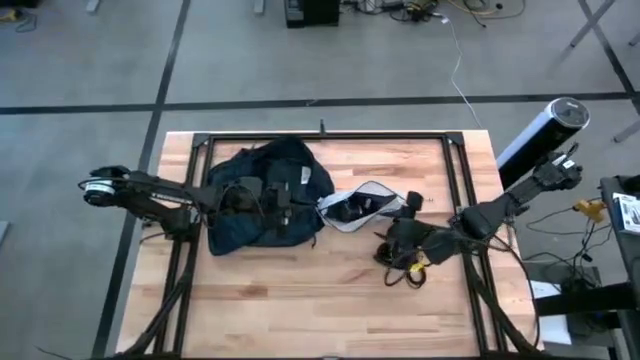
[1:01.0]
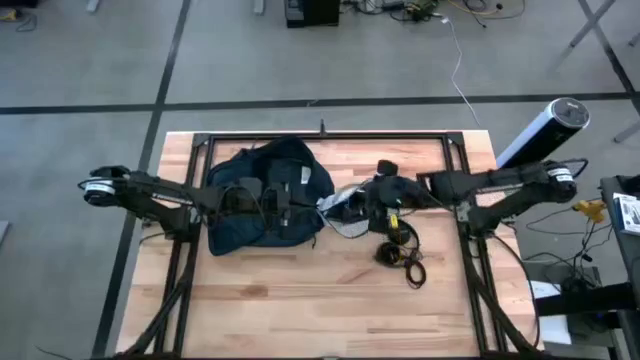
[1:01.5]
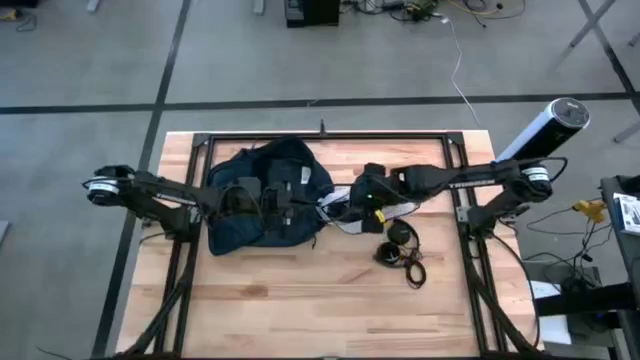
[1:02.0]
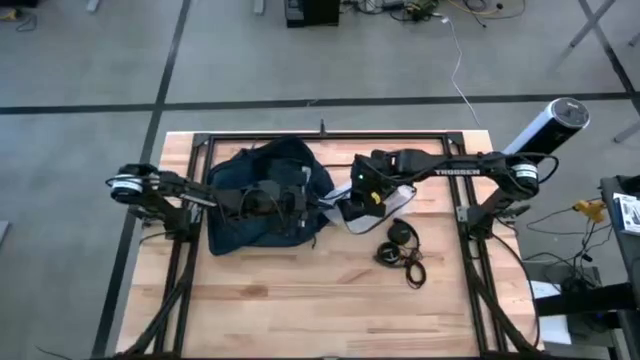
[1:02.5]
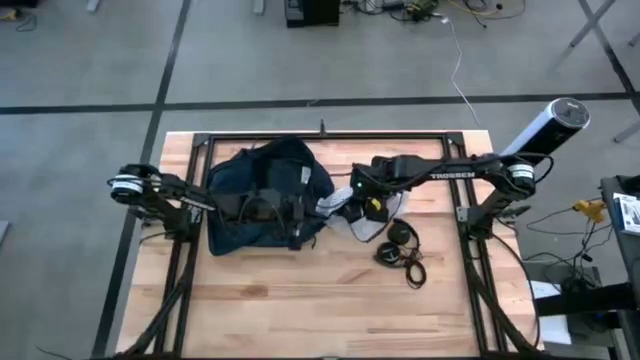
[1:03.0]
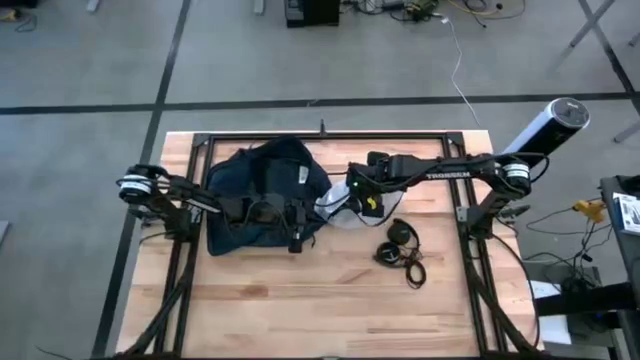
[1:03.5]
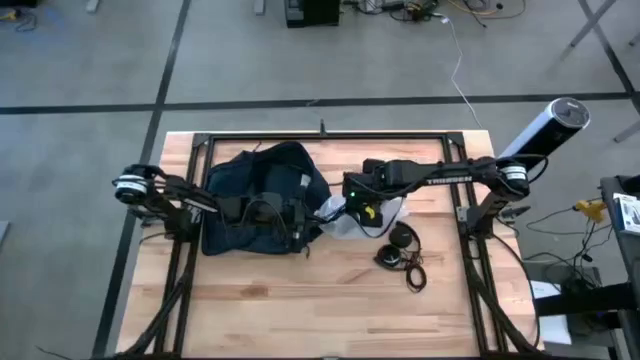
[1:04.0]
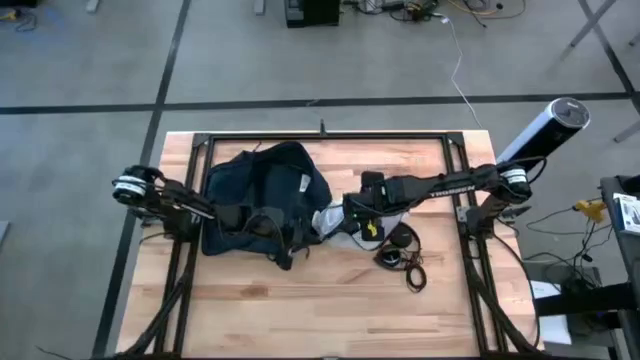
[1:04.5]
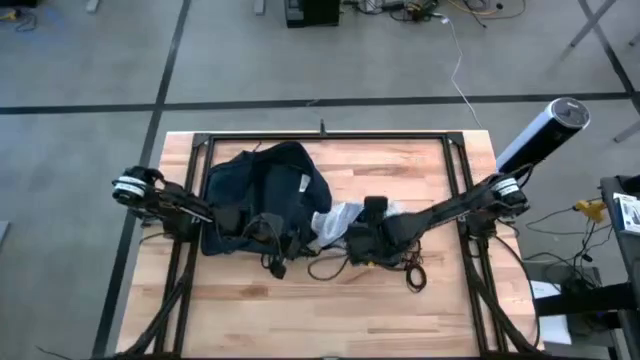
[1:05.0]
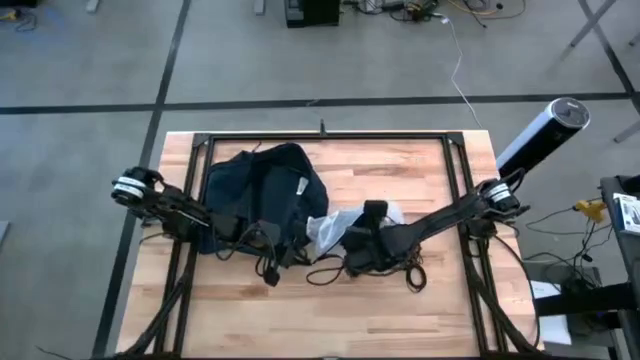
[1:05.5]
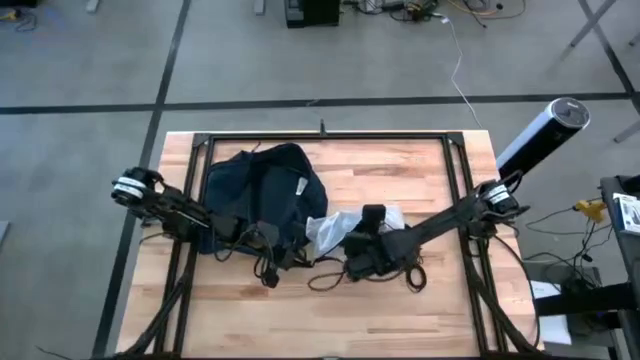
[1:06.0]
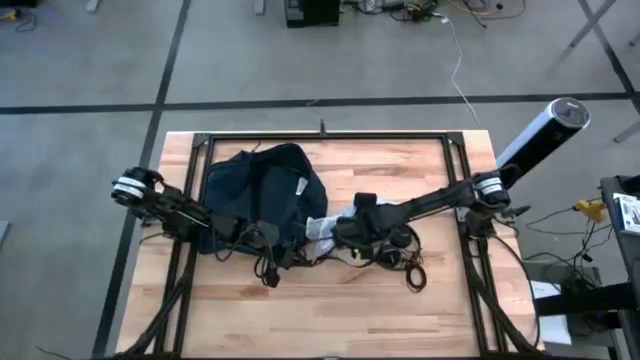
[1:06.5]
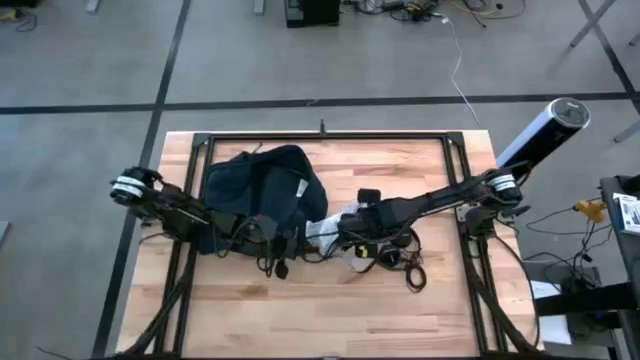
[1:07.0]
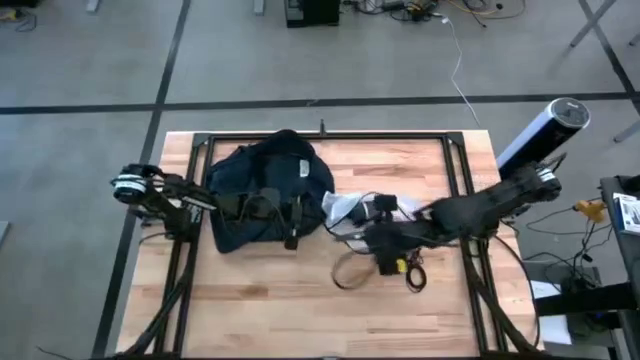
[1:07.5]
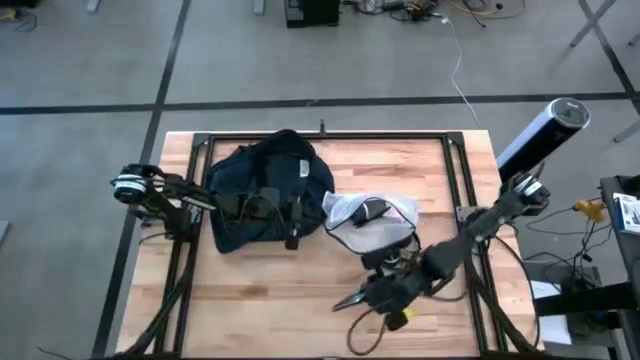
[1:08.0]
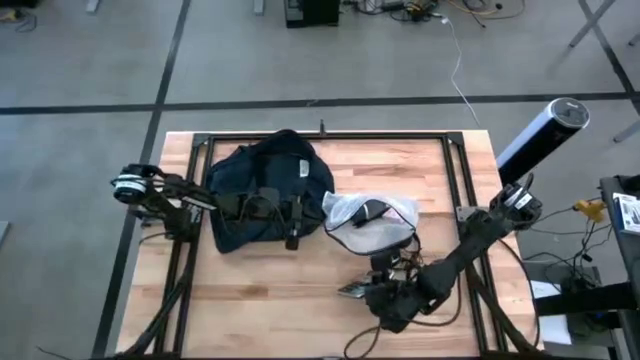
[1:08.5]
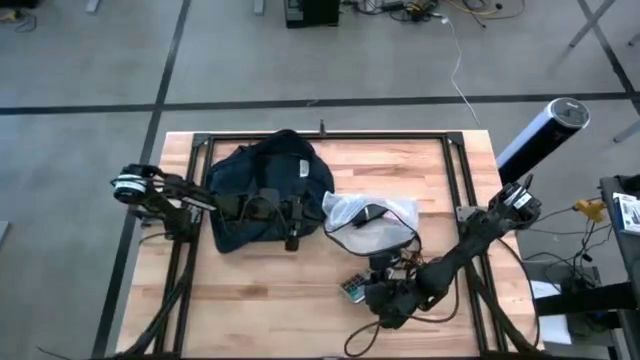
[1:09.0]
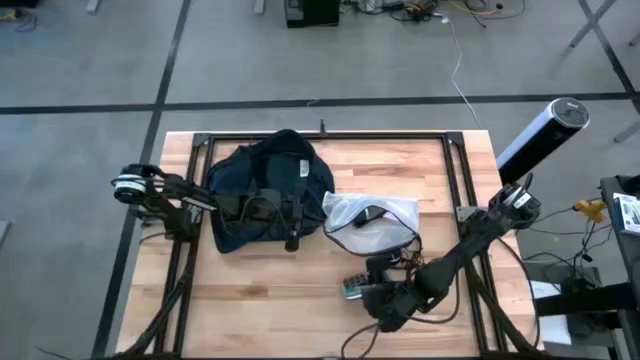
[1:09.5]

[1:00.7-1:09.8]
Task: Unpack backpack
Remove the white calculator from the white zipper pouch

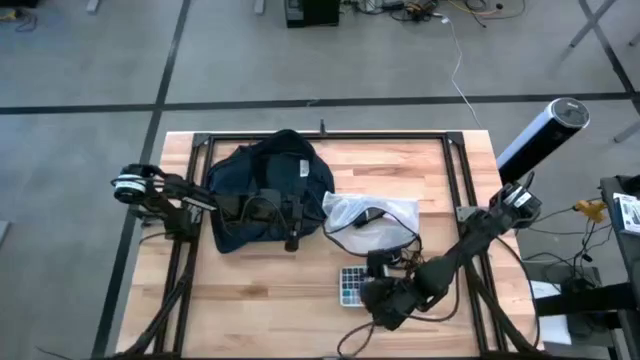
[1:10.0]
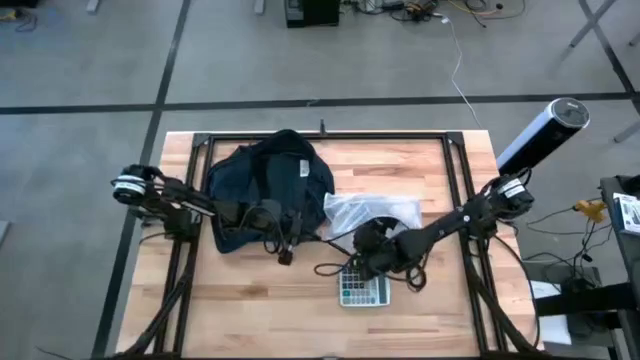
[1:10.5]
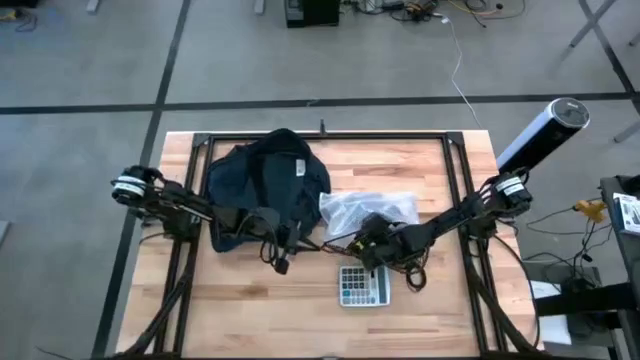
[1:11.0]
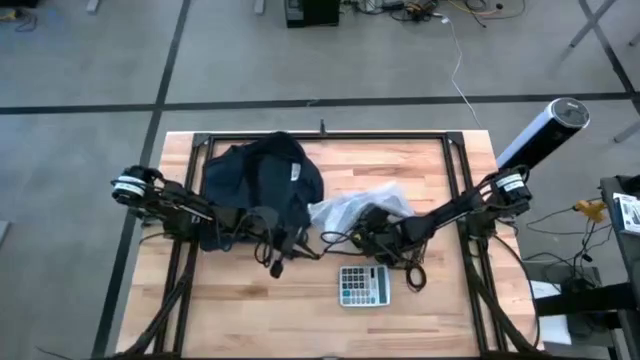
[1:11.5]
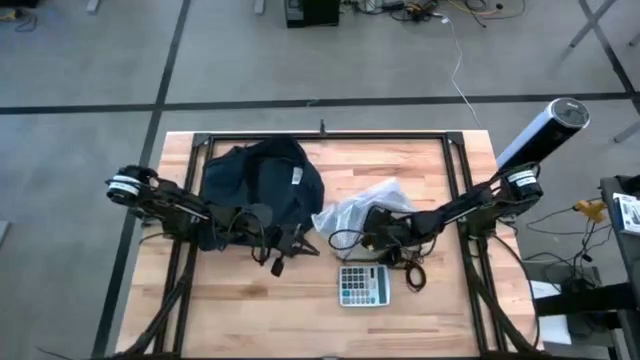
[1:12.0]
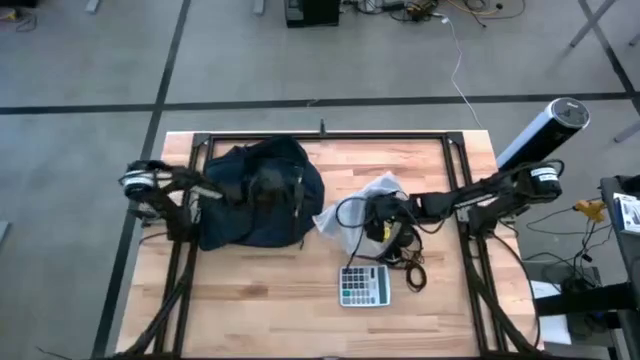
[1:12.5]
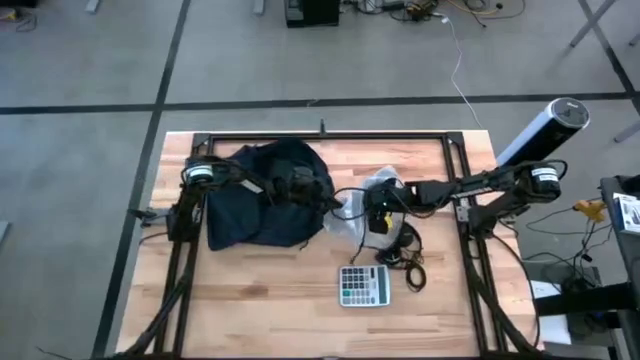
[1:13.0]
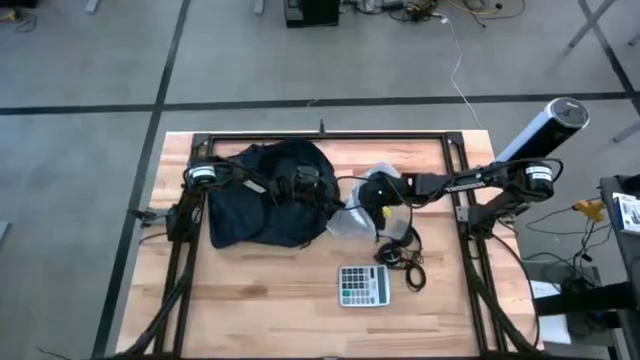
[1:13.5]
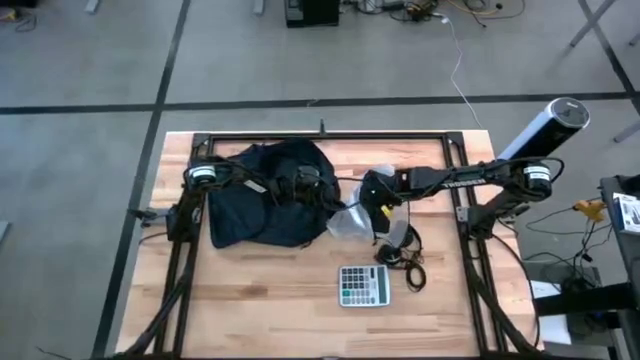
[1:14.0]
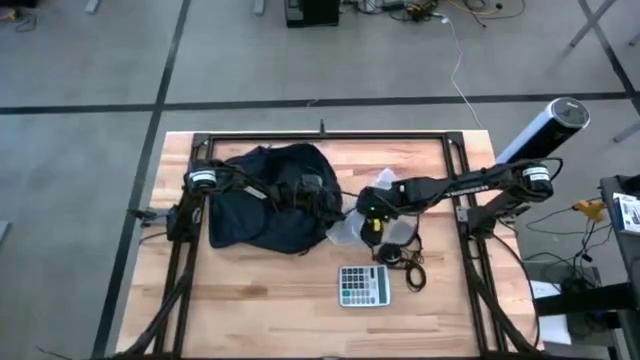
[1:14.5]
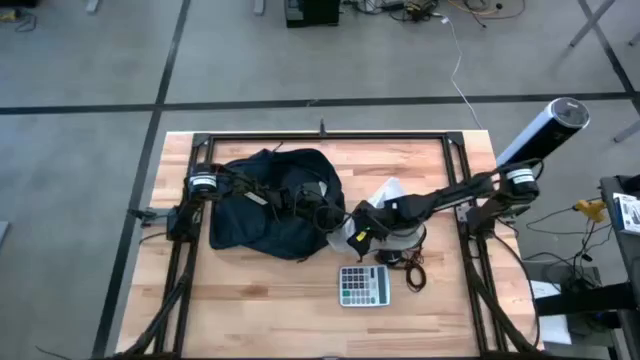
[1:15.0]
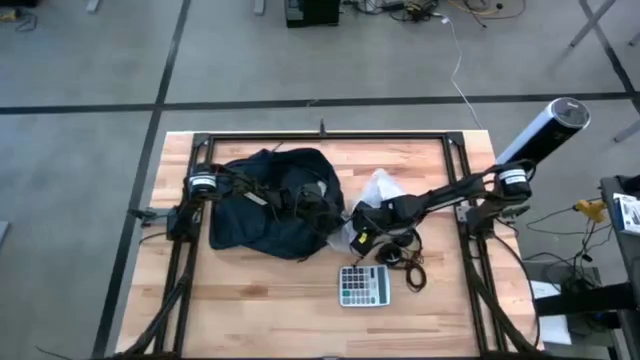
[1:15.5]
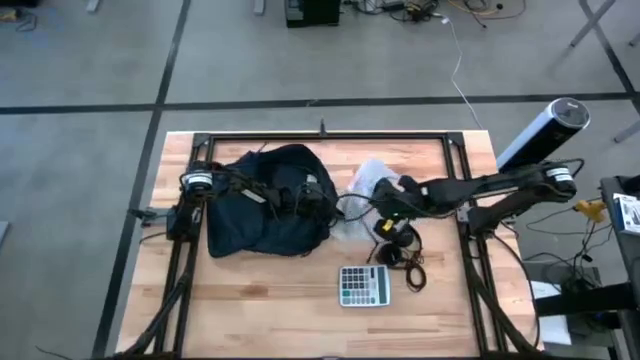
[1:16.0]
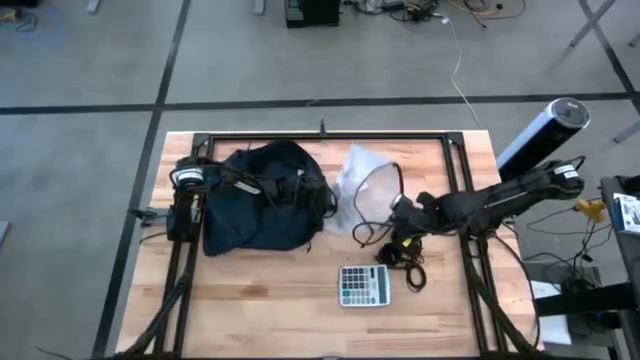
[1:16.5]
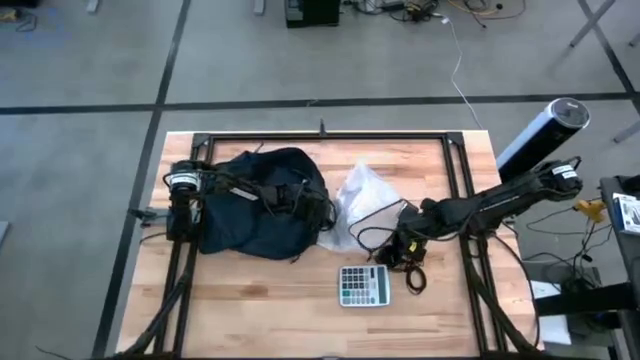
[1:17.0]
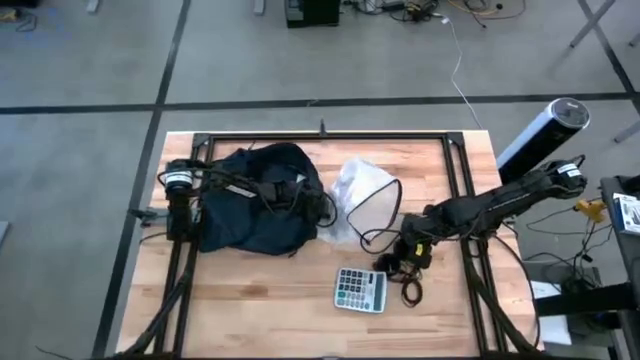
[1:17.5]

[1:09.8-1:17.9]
Remove the black hand fan from the white zipper pouch

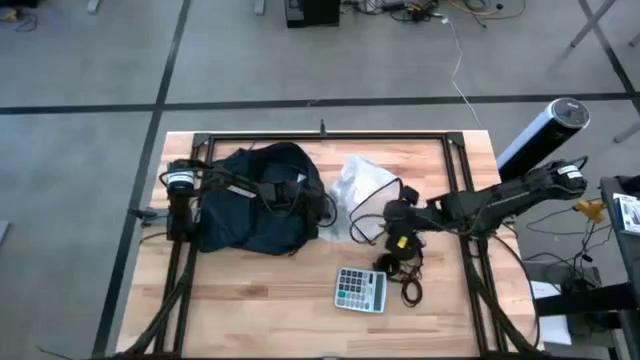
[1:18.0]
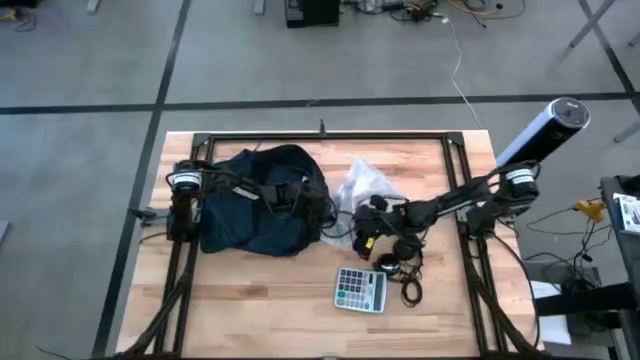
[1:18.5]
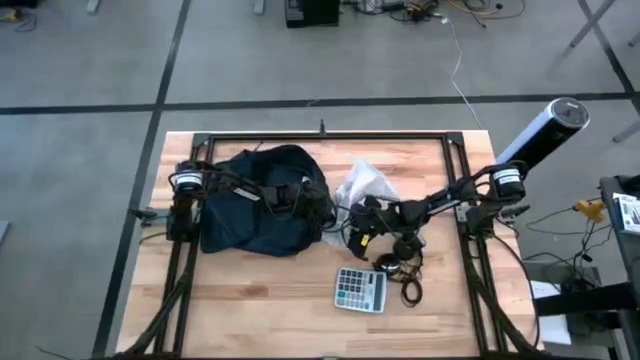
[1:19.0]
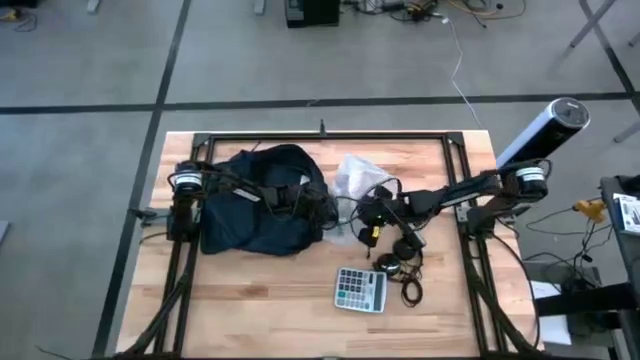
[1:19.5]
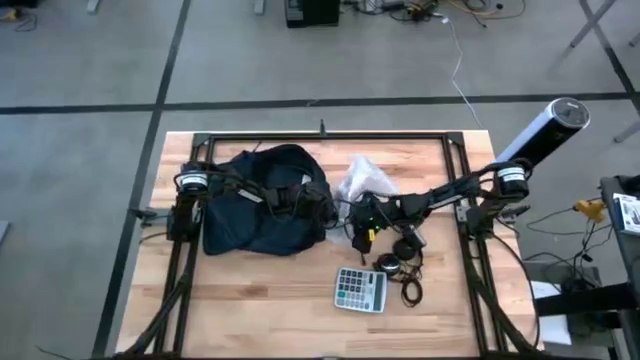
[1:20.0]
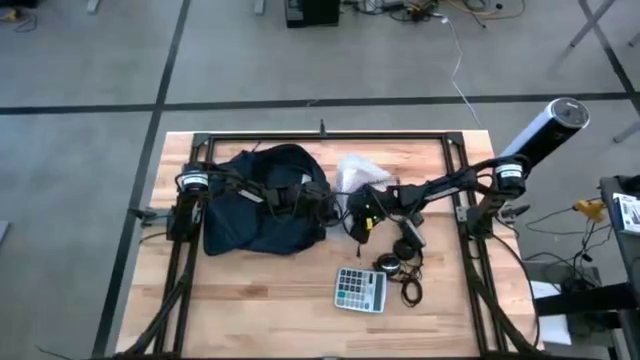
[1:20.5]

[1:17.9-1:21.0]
Remove the black pen from the white zipper pouch

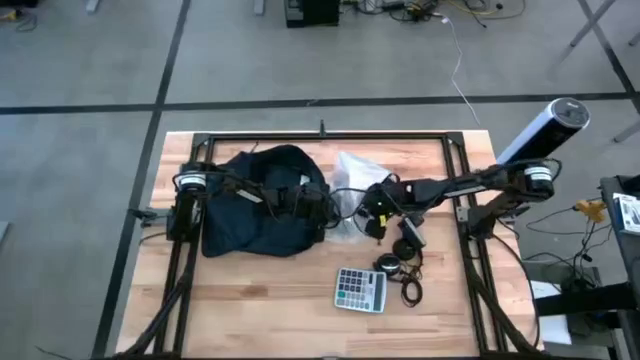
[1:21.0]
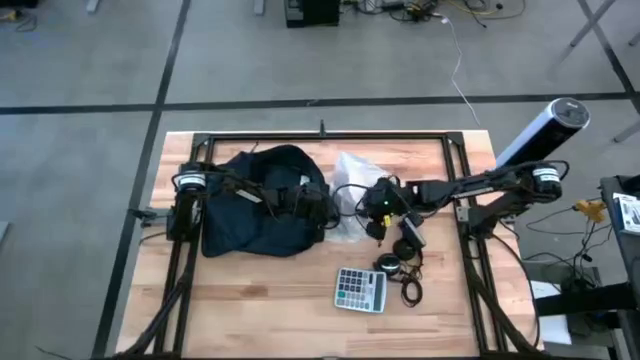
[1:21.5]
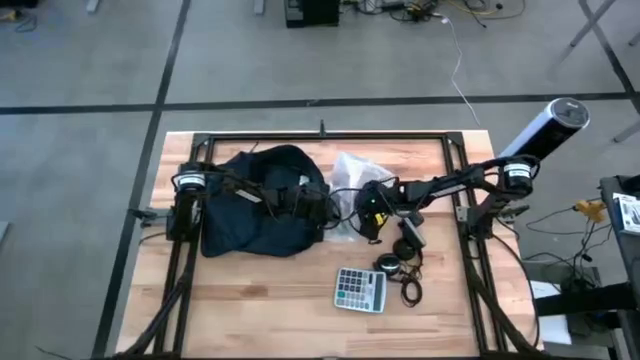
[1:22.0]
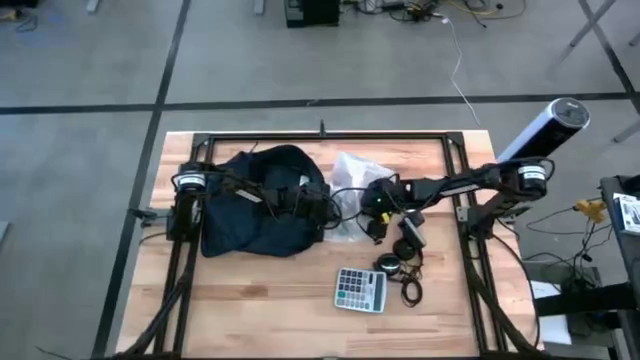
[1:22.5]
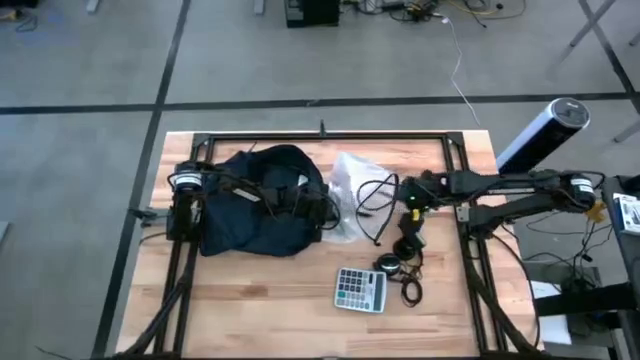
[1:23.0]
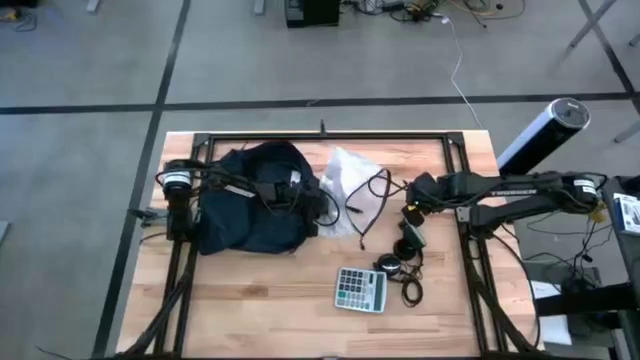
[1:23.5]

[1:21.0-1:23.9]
Remove the black pen from the white zipper pouch
